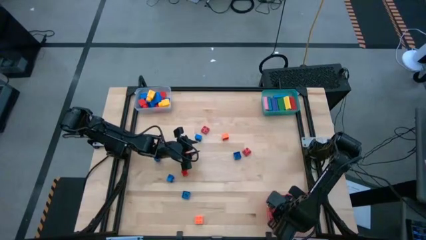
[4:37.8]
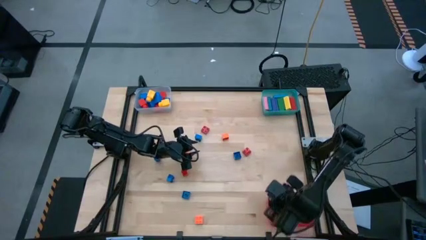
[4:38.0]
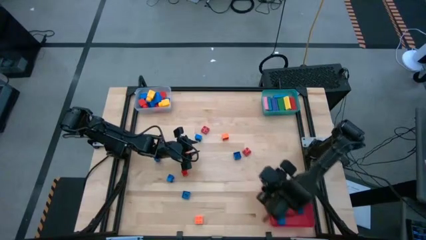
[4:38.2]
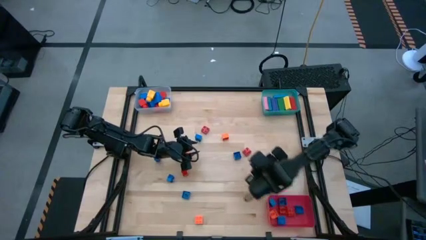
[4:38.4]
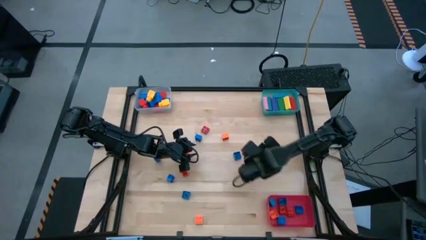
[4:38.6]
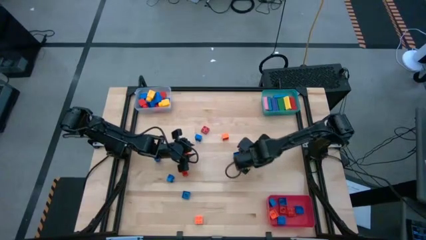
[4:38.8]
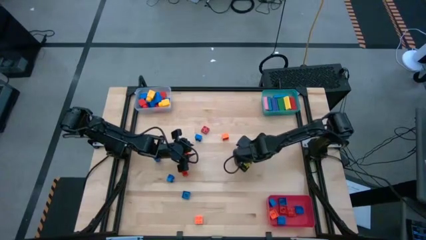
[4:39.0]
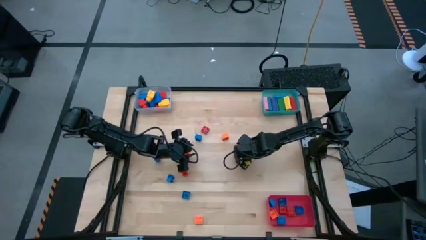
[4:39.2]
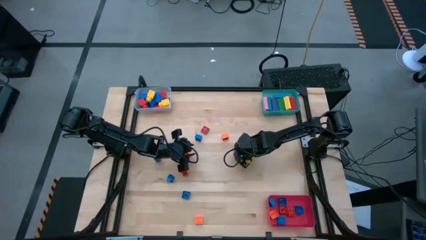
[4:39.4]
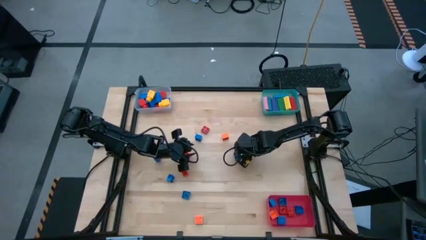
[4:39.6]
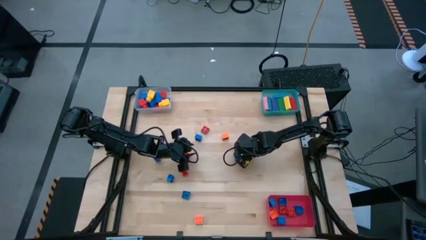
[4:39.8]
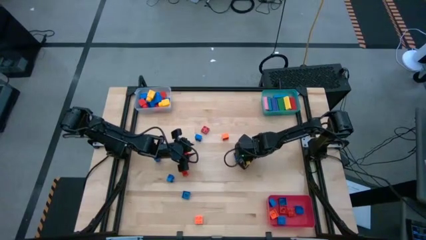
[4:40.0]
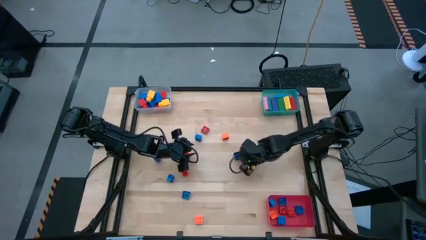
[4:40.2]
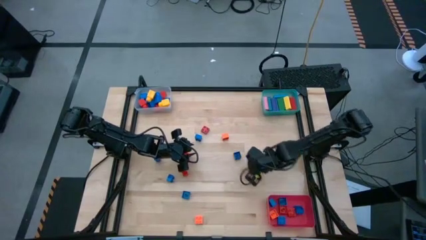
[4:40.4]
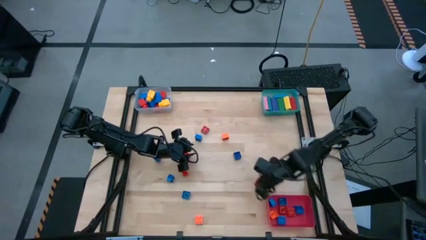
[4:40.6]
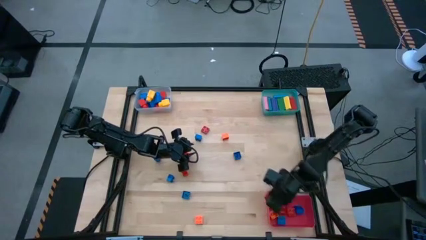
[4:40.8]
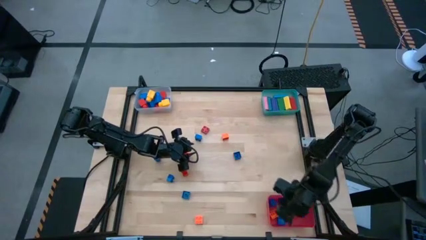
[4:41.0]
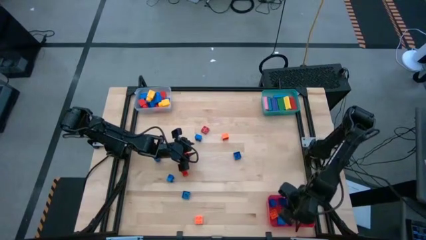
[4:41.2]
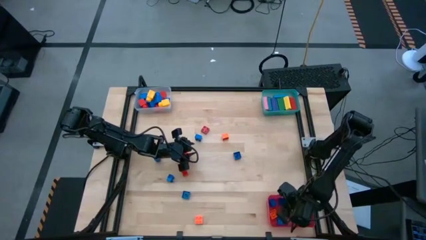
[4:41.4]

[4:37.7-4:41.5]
Task: Sort blocks by size
Put the small red game piece into the red bin

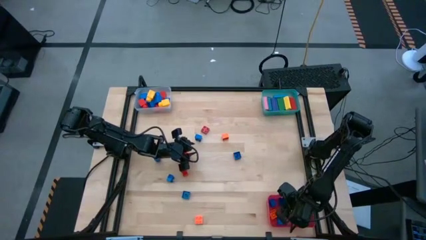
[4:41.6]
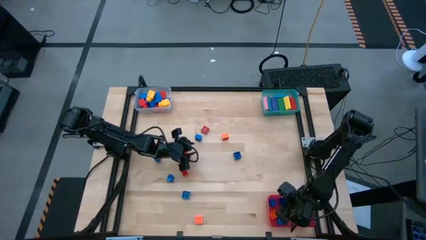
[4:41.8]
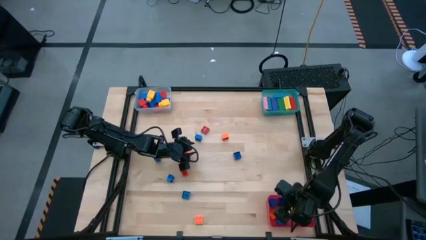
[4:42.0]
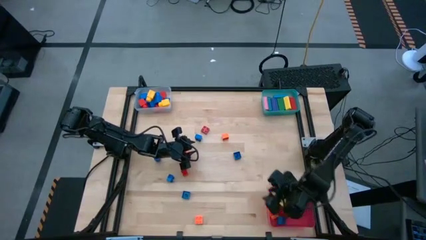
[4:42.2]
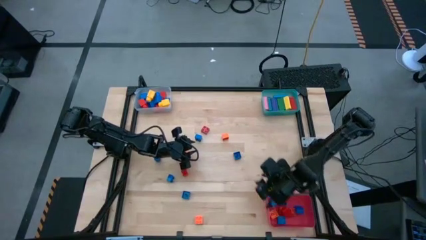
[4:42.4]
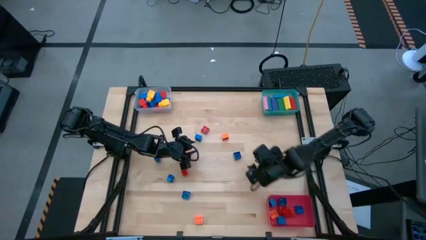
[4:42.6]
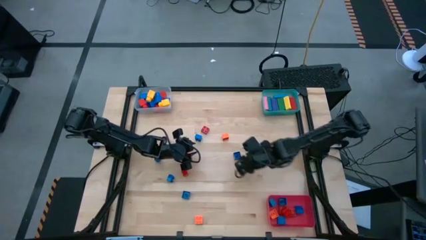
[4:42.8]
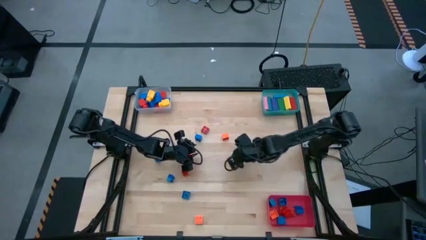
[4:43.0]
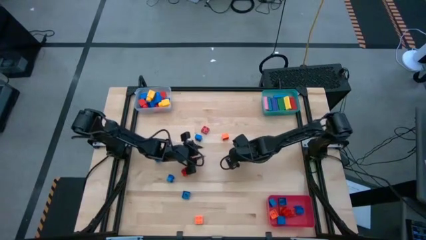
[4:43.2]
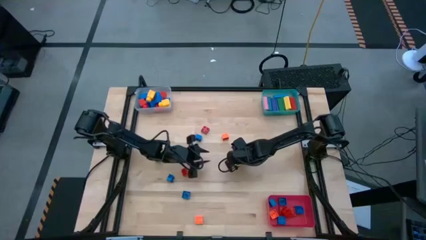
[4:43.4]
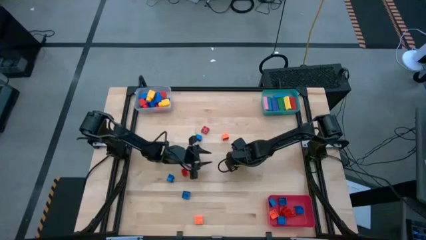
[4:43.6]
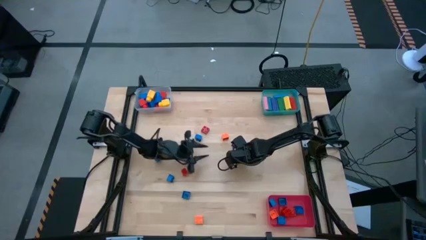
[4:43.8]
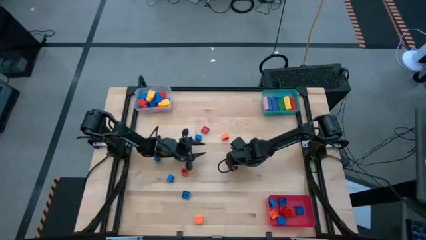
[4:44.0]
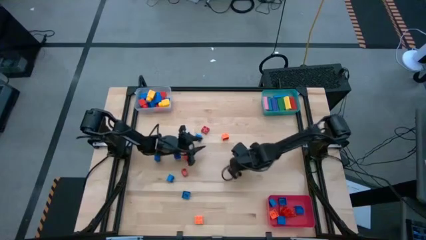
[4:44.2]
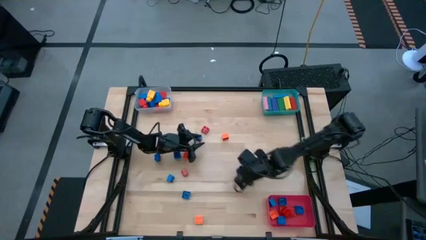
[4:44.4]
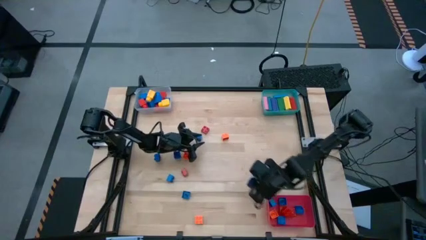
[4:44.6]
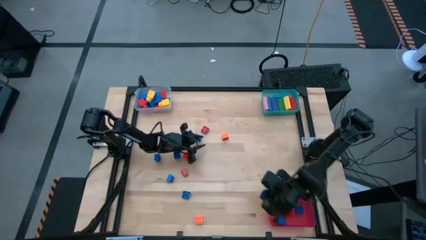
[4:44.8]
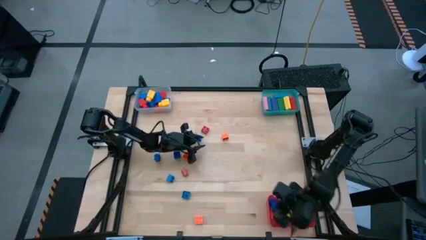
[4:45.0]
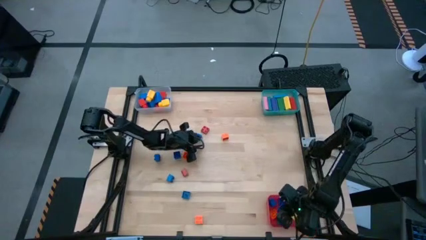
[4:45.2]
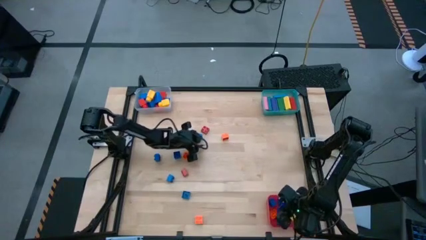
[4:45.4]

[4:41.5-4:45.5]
Put the small blue game piece into the red bin

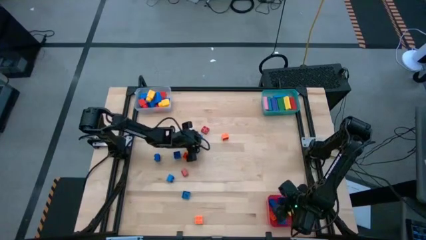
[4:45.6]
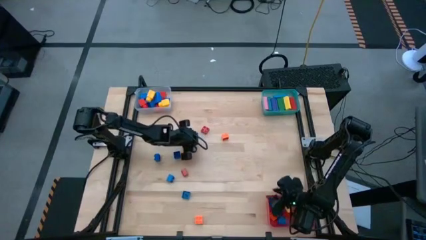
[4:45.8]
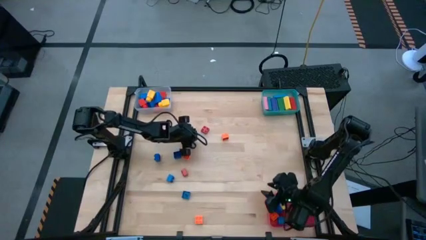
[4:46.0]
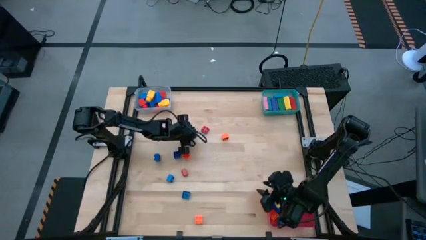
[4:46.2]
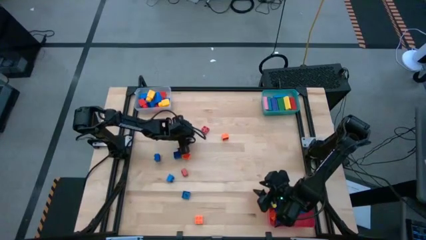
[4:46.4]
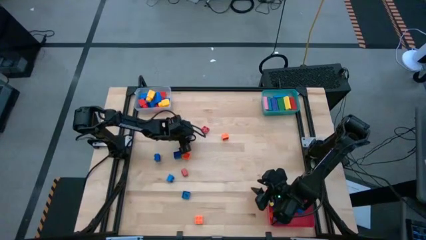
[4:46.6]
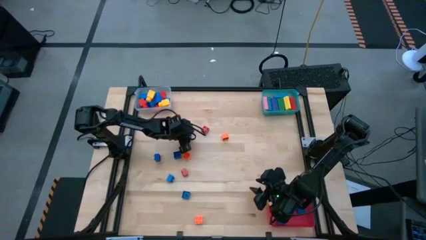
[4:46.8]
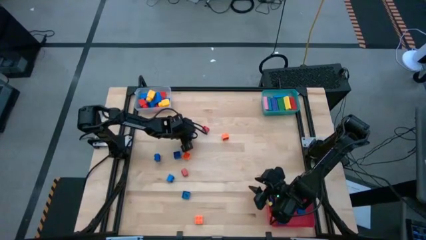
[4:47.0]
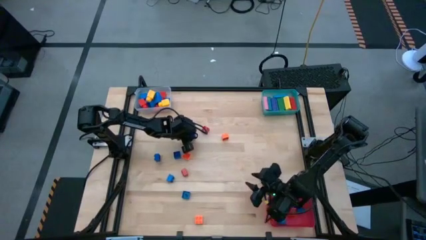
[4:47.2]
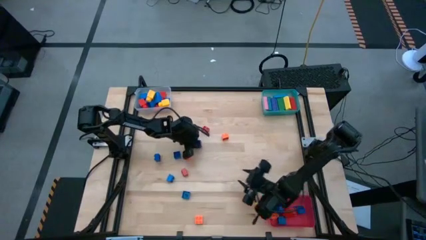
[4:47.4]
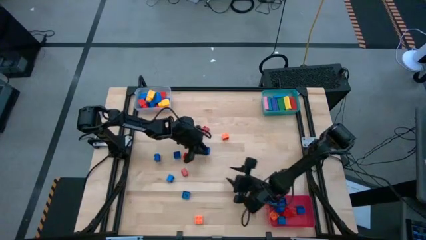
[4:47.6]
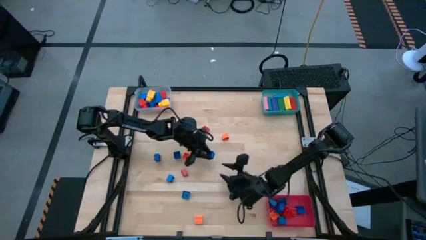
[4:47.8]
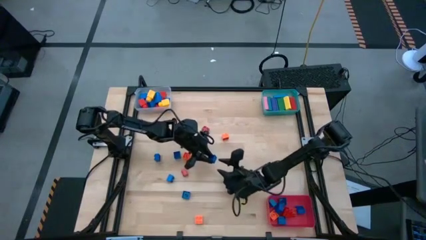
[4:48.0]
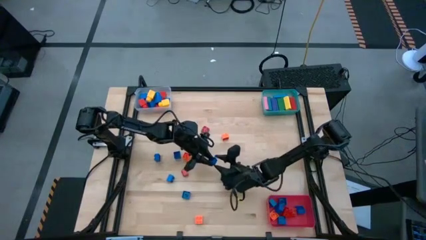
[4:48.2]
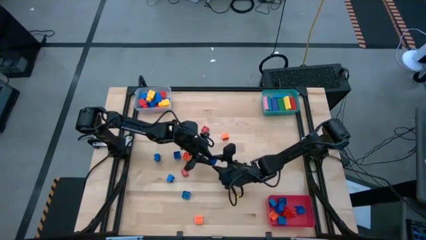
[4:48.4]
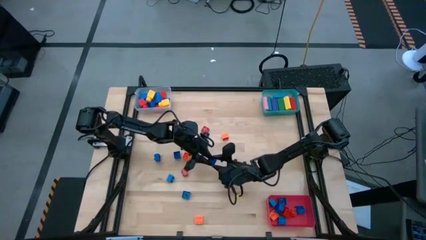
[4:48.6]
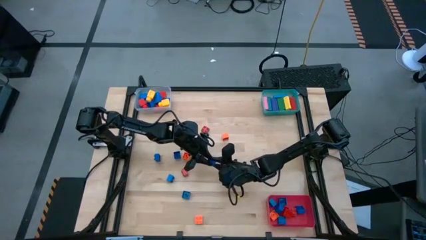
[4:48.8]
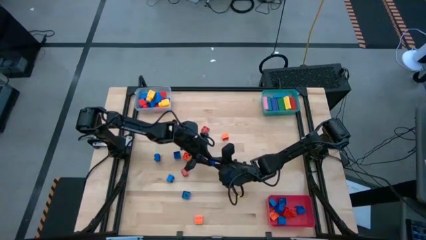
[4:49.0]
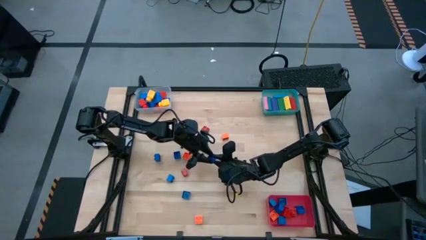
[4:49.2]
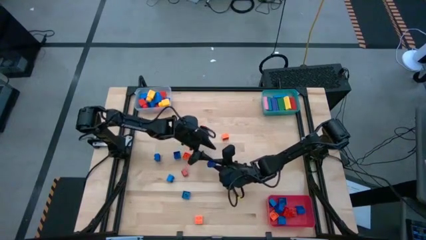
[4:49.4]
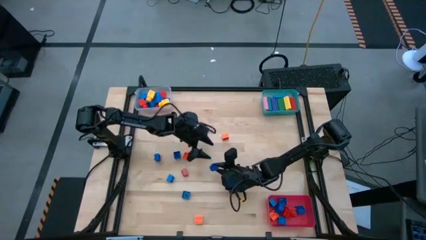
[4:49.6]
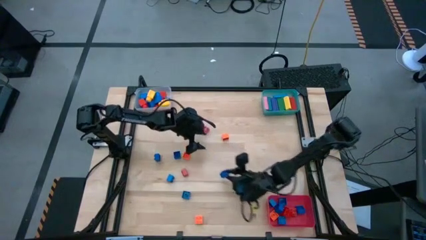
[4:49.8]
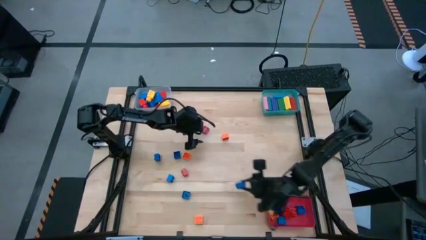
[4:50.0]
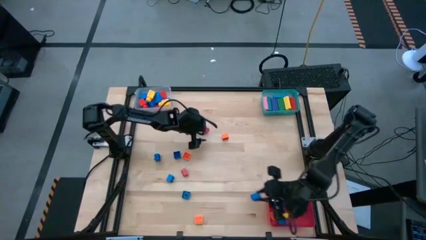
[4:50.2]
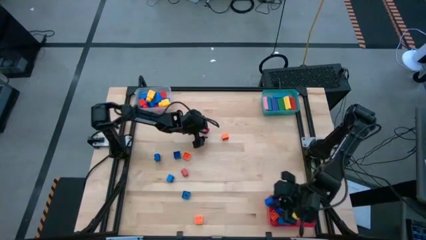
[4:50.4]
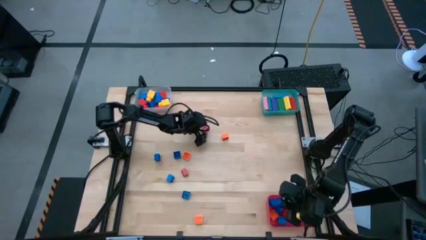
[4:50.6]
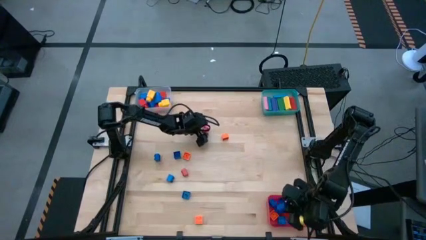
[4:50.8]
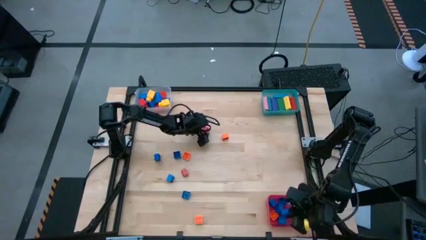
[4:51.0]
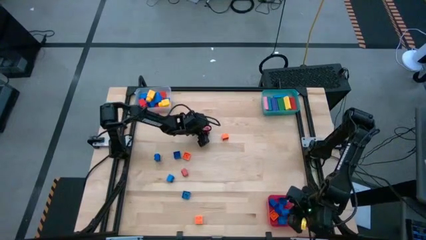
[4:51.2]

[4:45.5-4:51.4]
Put the small blue game piece into the red bin

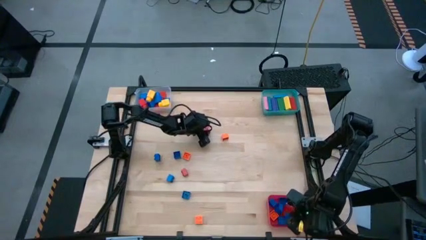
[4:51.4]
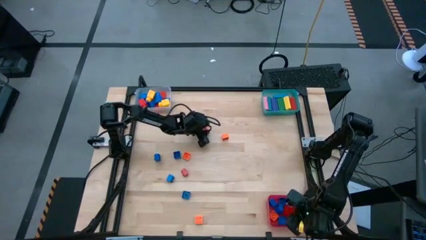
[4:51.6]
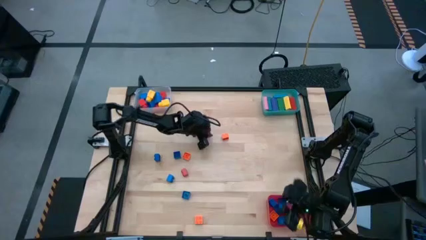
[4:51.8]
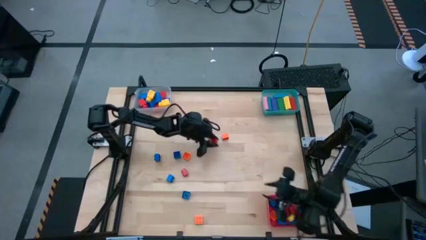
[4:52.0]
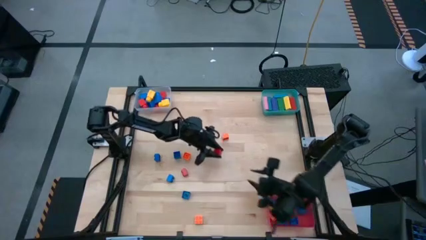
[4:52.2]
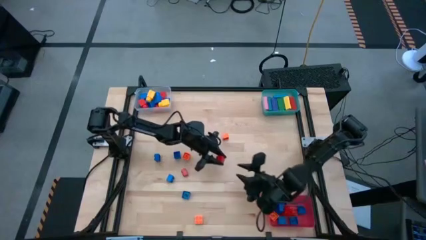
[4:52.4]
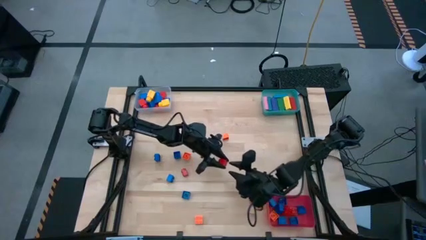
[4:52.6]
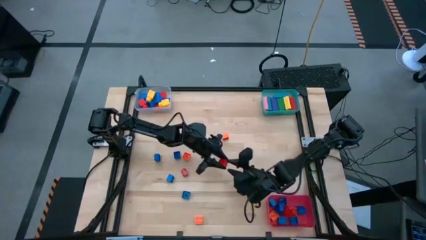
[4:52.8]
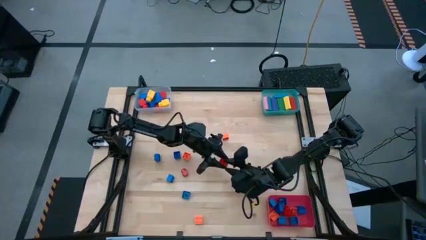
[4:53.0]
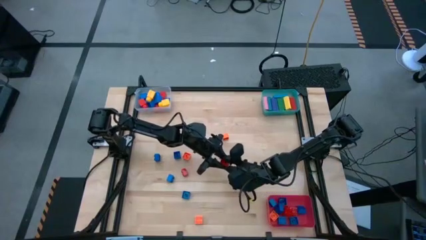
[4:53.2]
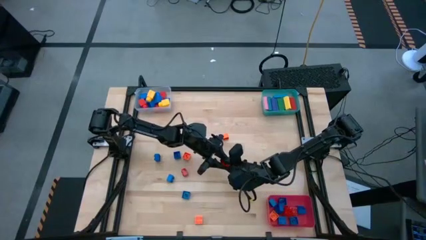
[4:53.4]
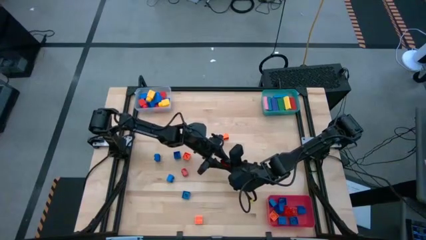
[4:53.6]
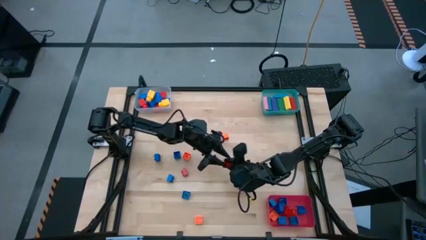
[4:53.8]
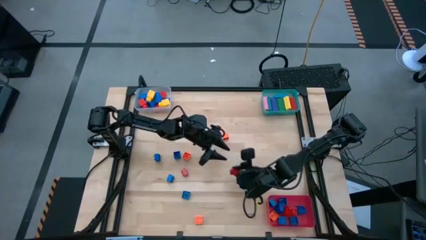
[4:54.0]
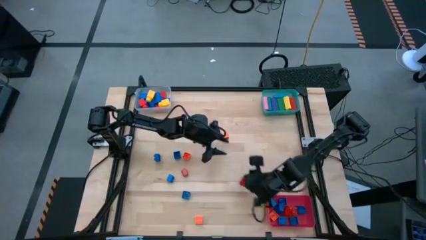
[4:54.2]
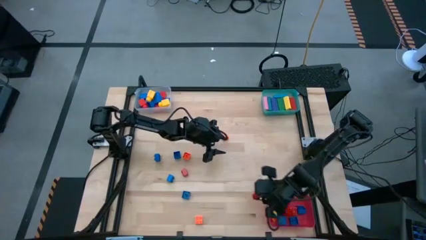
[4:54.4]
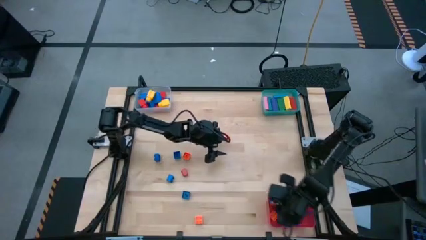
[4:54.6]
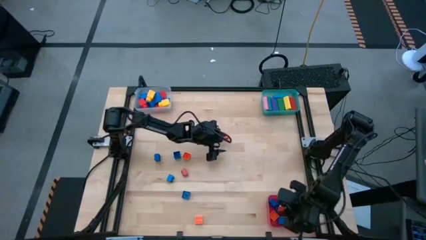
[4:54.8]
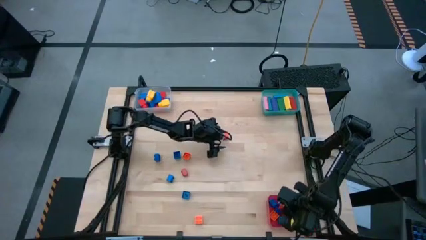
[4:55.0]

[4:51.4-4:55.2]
Put the small red game piece into the red bin
